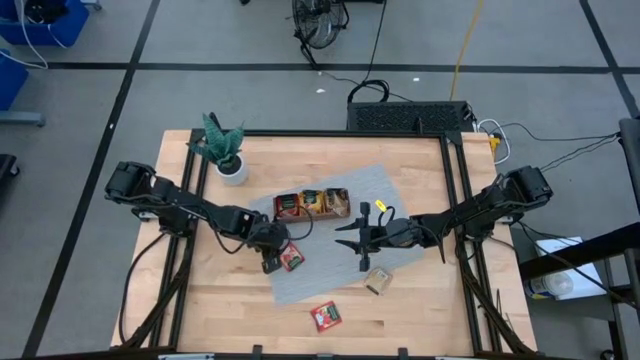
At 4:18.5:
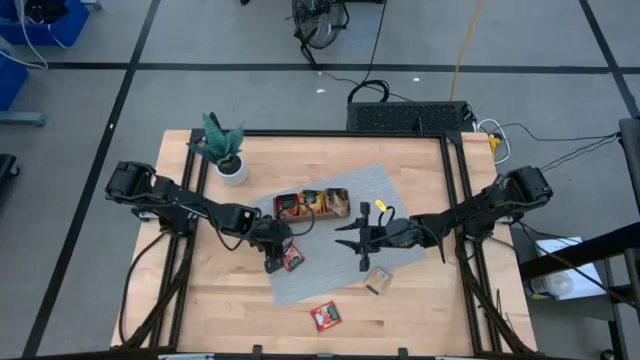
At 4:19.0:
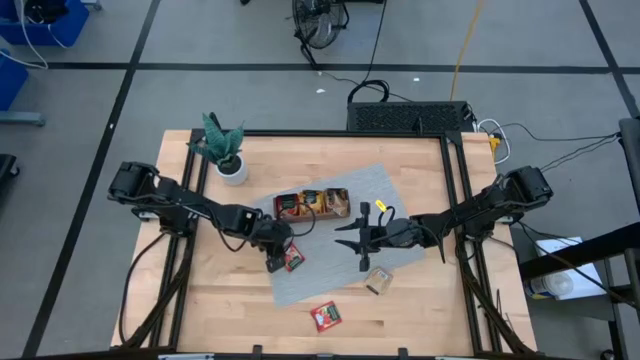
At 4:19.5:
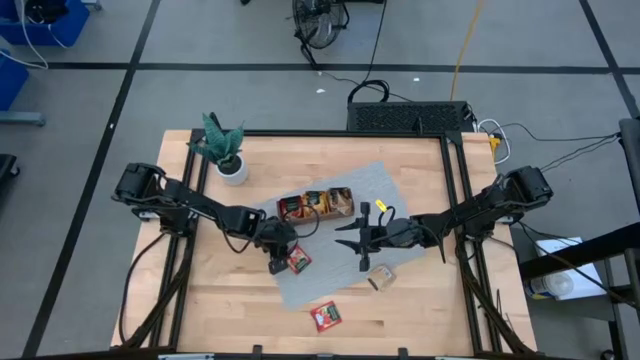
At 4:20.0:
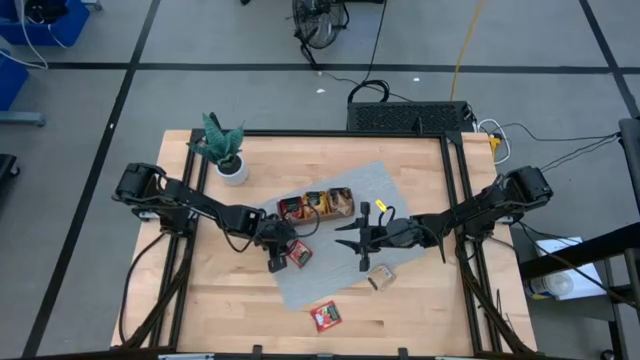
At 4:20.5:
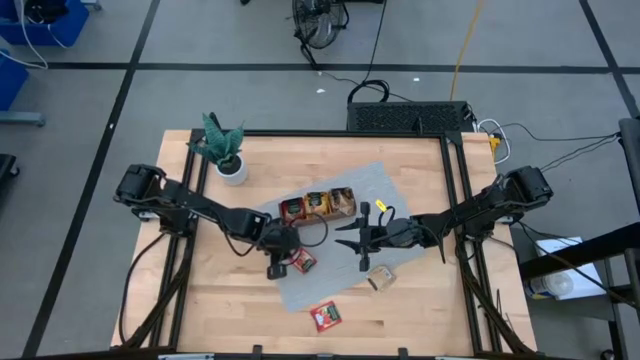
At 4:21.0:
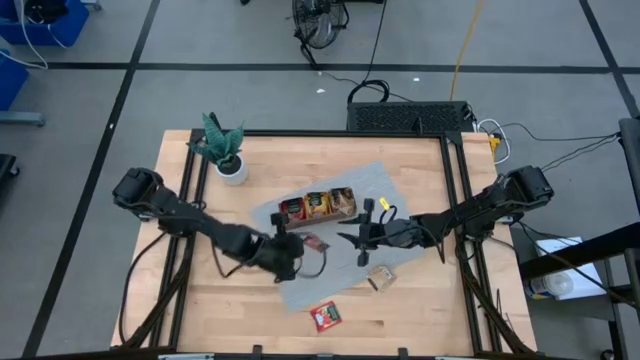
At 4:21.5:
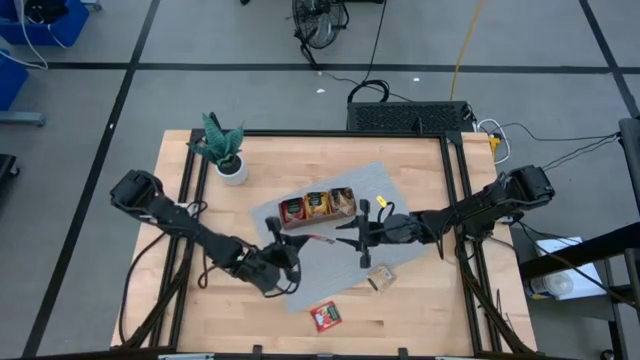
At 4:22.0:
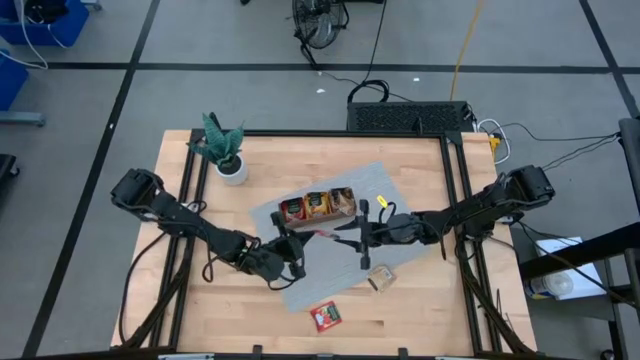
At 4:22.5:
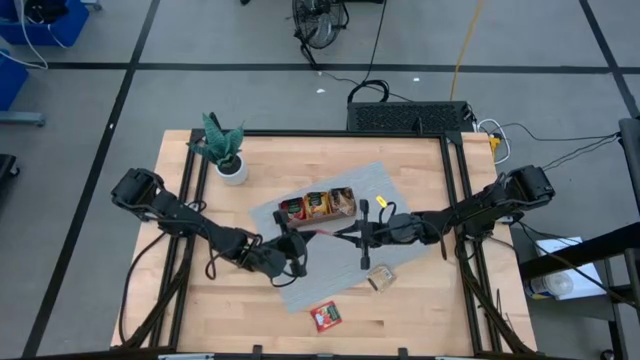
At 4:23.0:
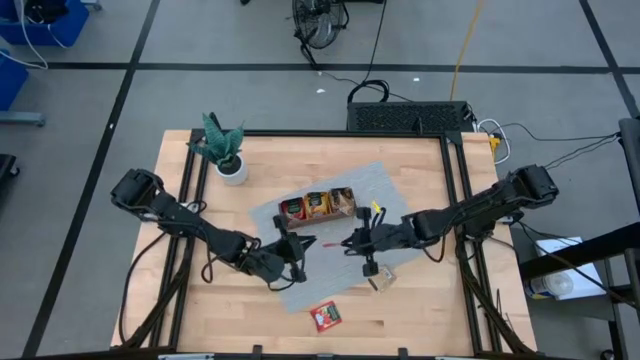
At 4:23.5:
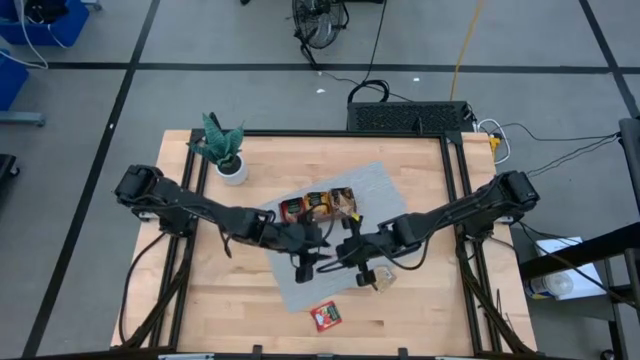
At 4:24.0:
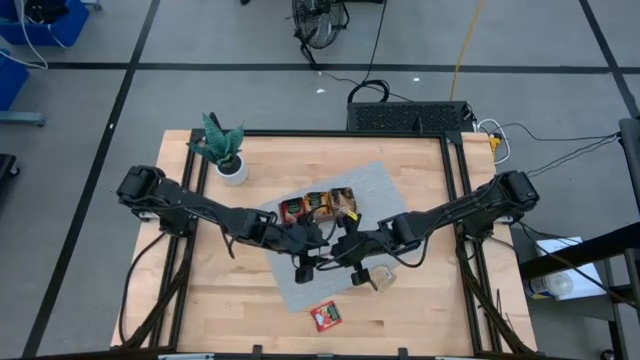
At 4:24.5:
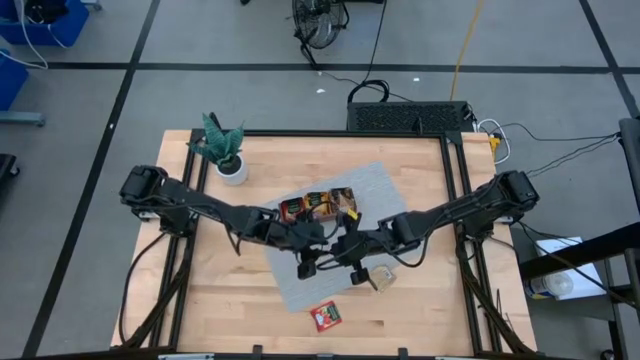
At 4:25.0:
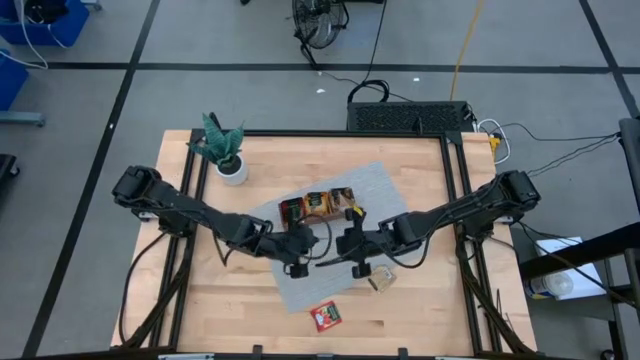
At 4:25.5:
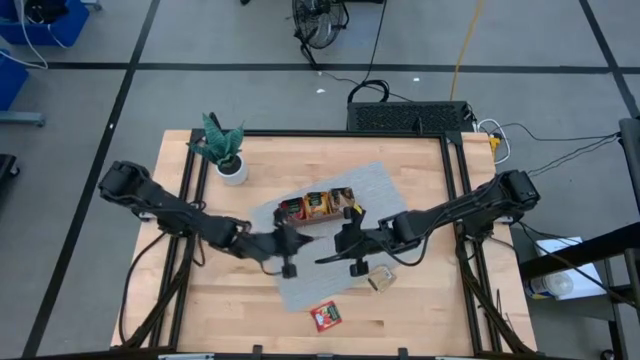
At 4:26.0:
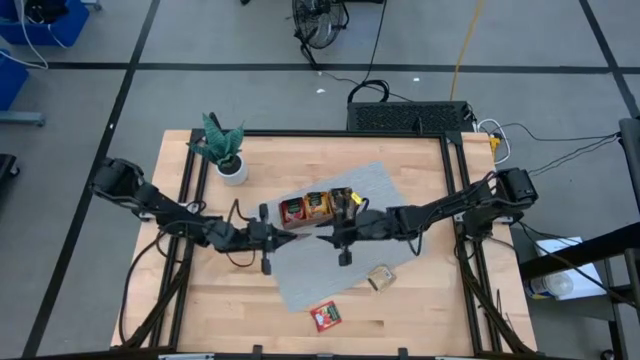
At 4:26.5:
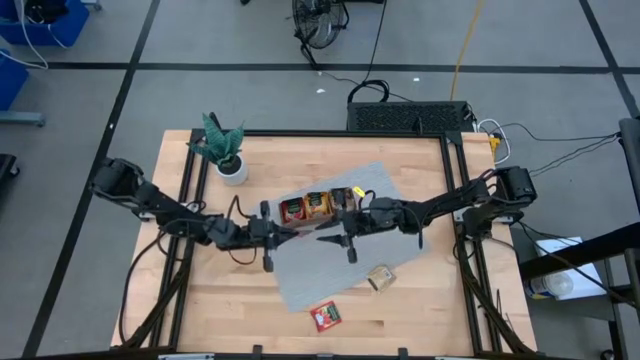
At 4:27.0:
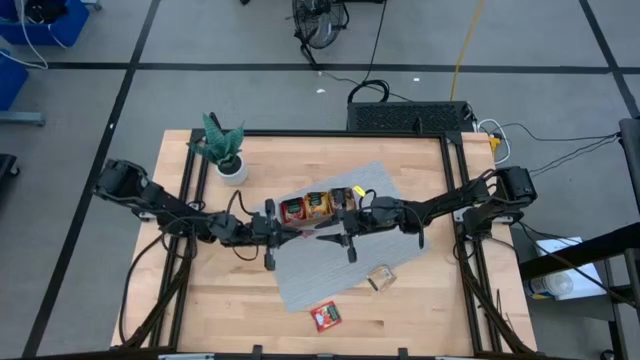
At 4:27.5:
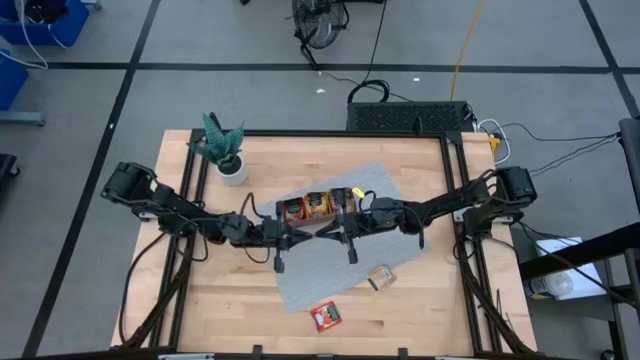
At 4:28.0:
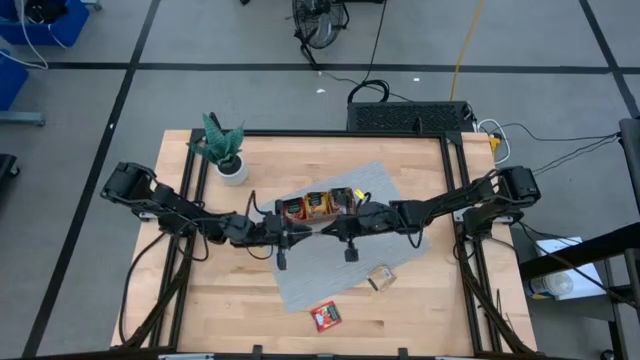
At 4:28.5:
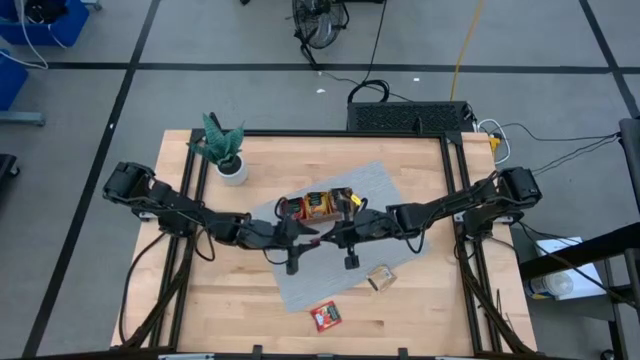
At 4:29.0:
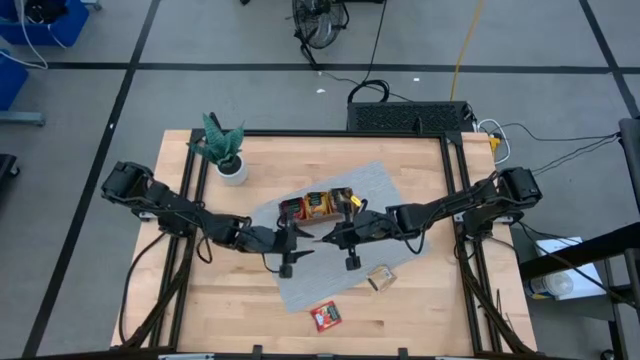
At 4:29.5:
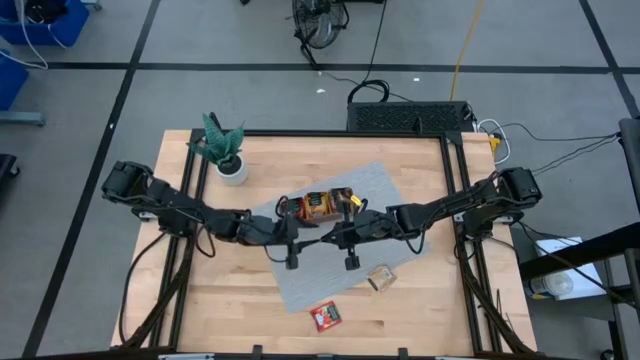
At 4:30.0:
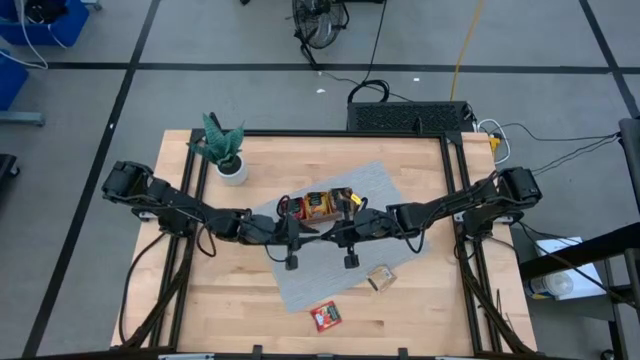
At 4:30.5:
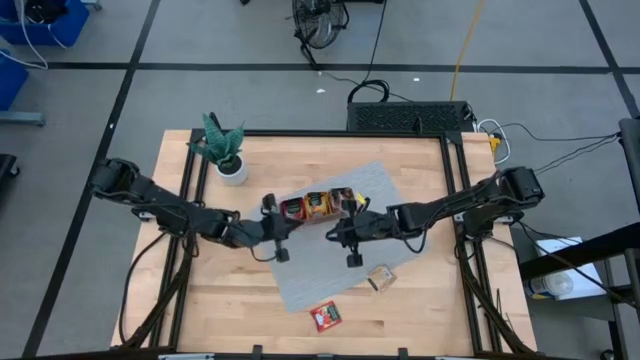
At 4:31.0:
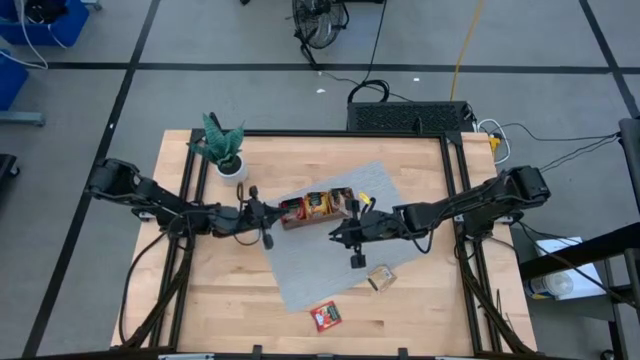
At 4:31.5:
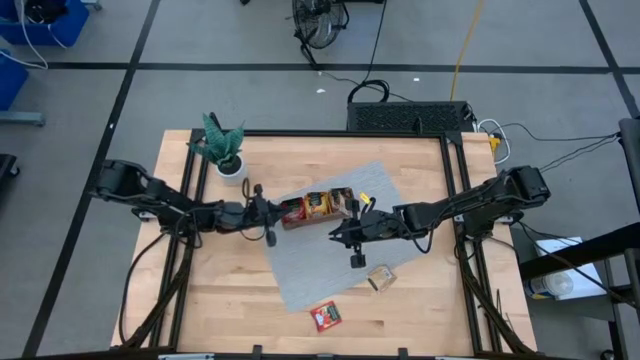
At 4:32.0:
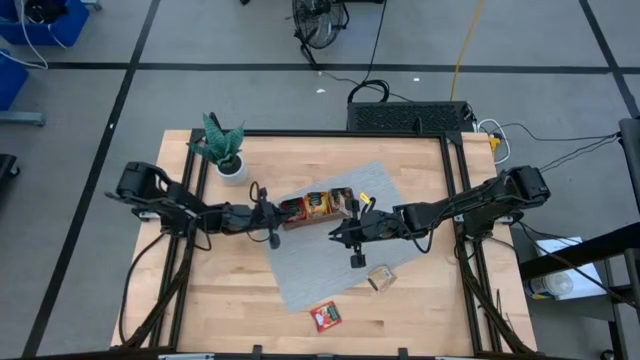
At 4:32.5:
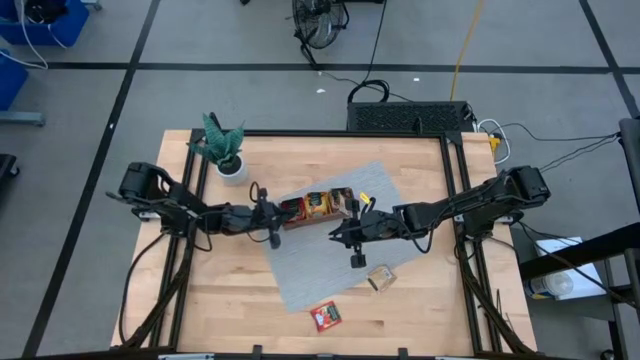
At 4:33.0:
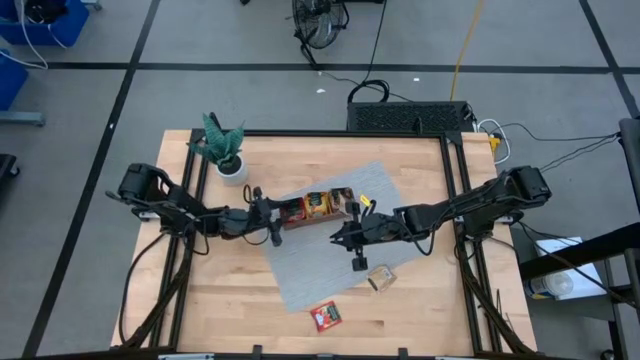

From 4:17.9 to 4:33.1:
Task: Pick & Place Tea
Put the top red tea into the left part of the wooden organizer

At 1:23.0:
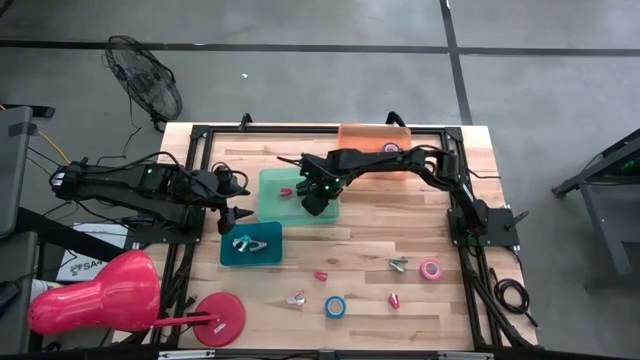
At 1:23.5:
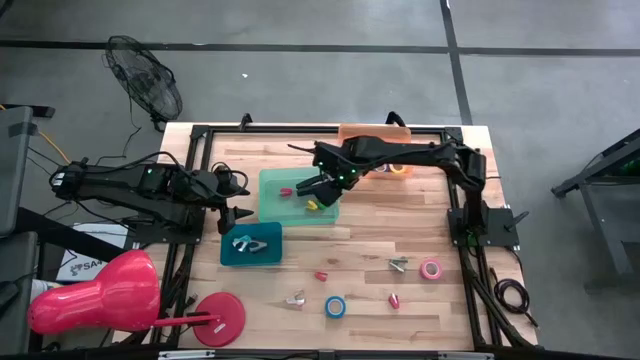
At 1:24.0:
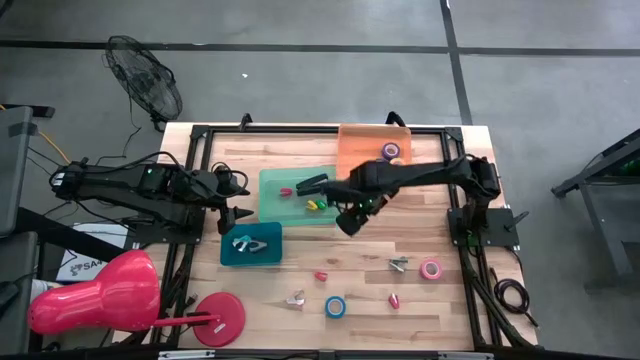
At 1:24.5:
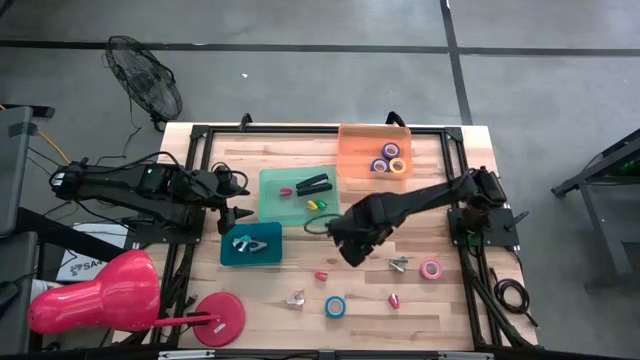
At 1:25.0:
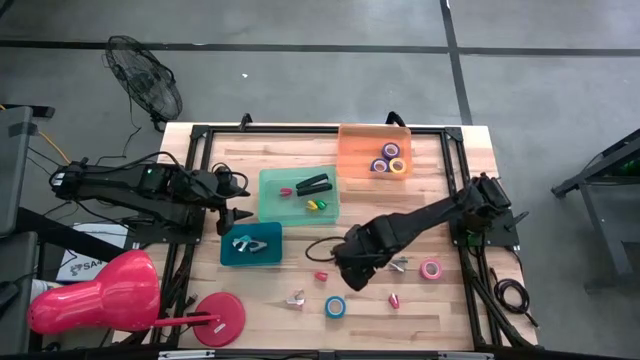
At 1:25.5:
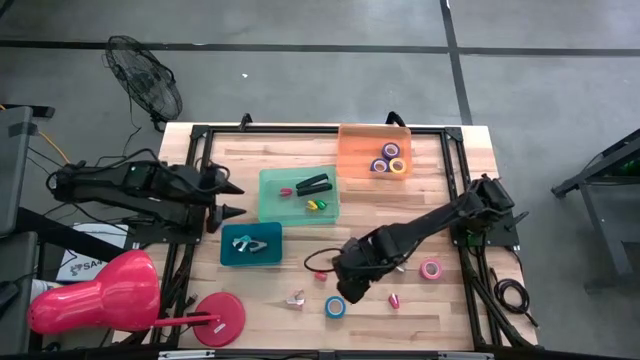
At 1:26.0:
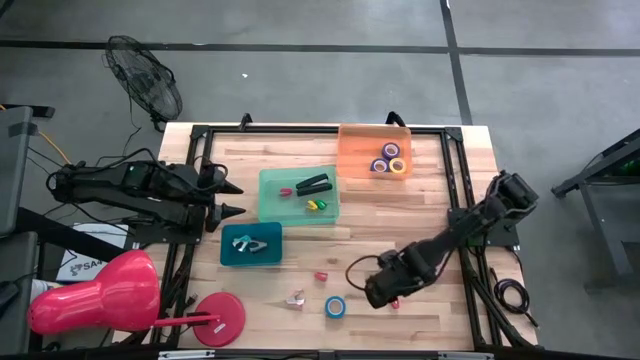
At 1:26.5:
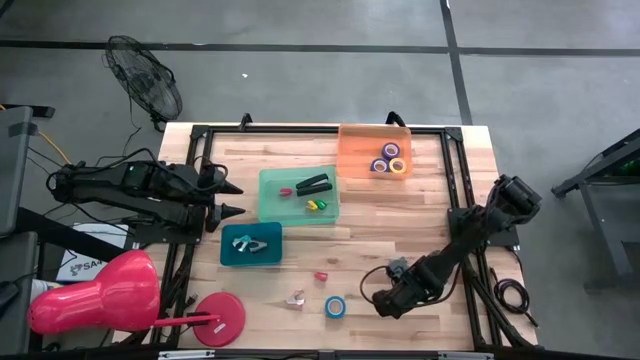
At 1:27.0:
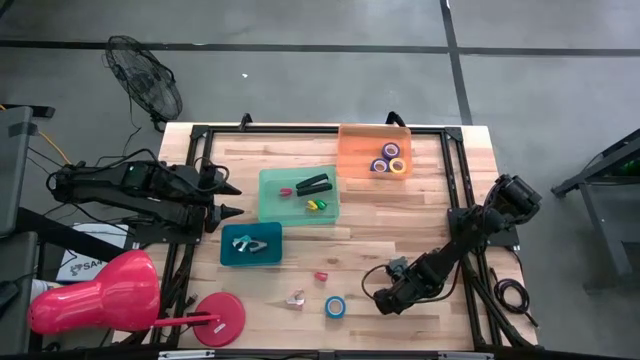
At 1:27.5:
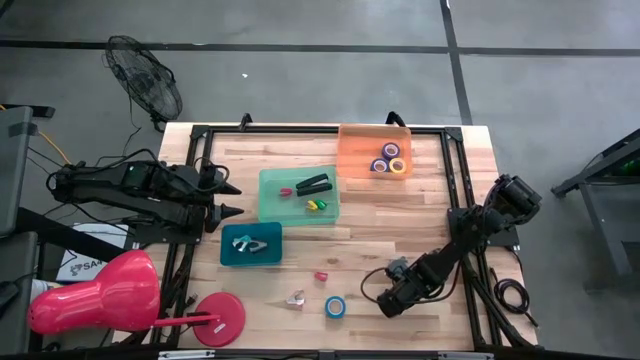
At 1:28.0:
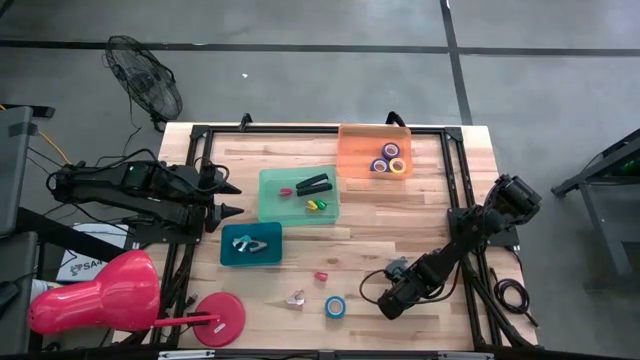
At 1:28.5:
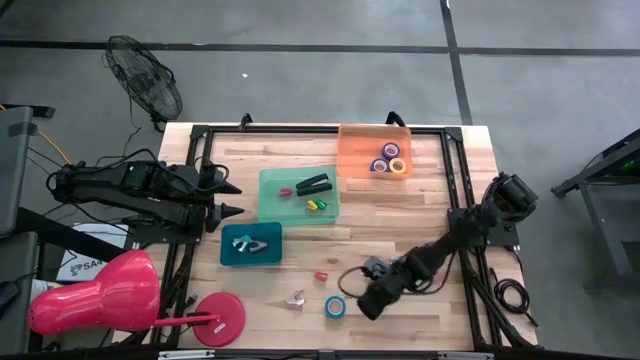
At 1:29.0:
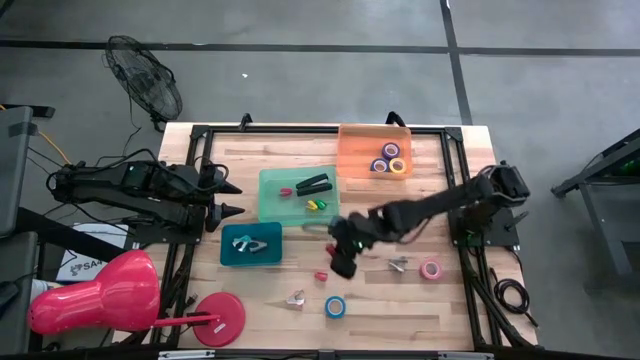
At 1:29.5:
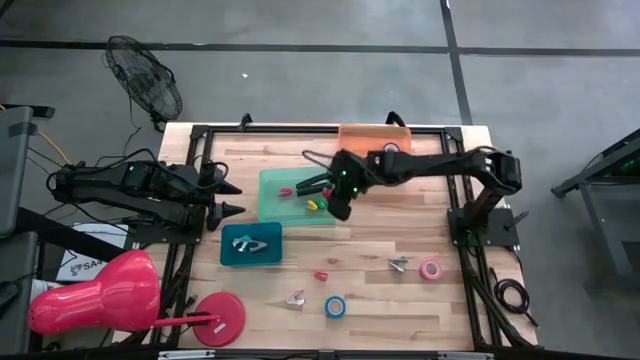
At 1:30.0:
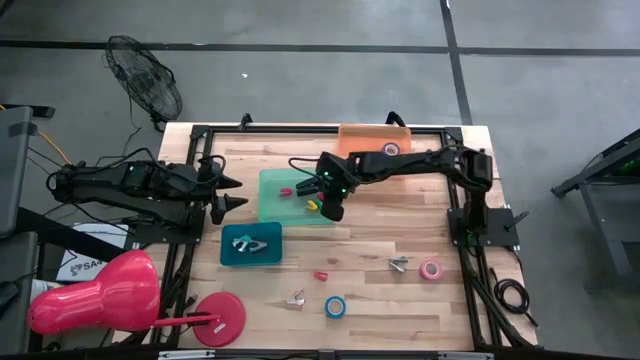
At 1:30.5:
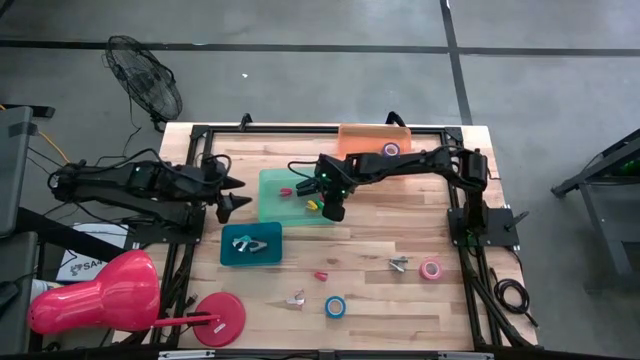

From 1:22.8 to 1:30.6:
Task: Pick and place Stapler, Stapler remover, tape
Put the right red small staple remover in the light green bin
